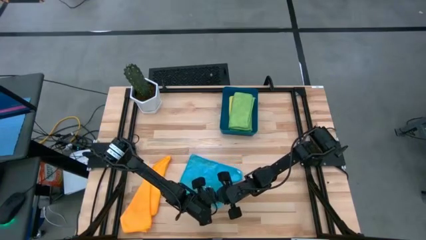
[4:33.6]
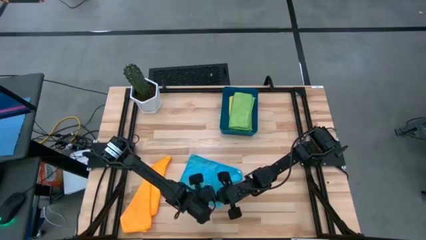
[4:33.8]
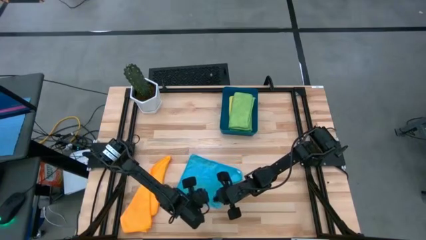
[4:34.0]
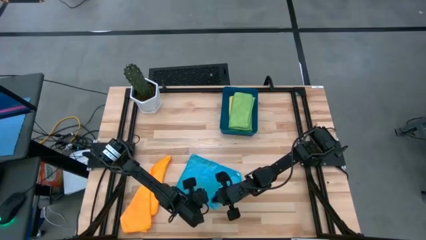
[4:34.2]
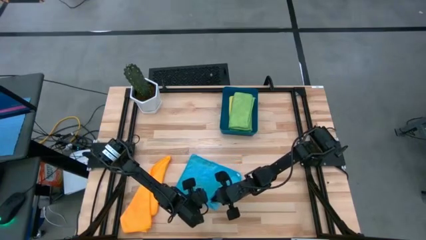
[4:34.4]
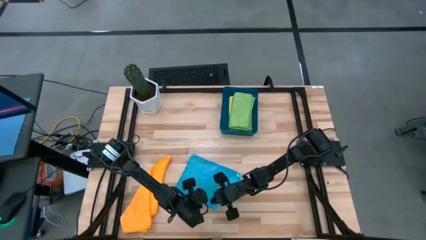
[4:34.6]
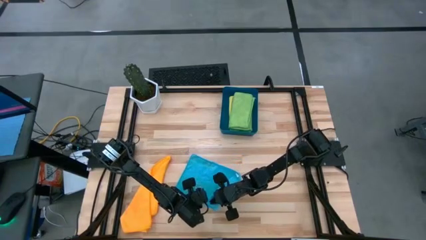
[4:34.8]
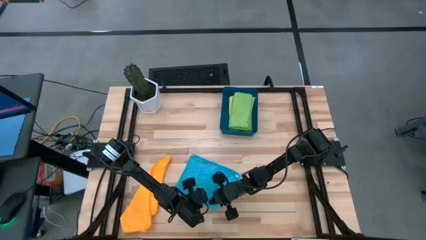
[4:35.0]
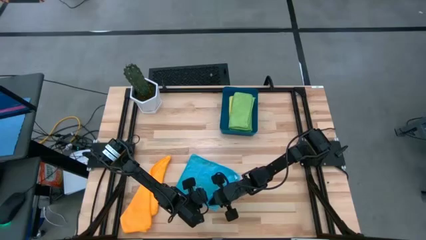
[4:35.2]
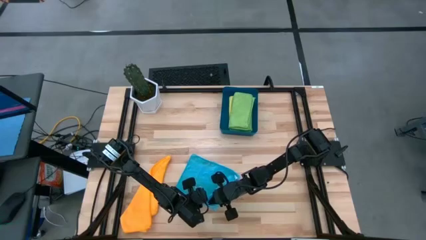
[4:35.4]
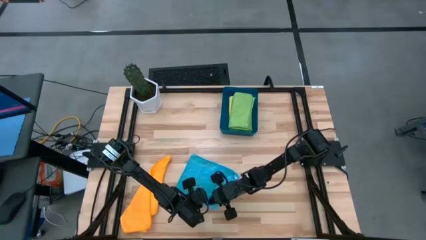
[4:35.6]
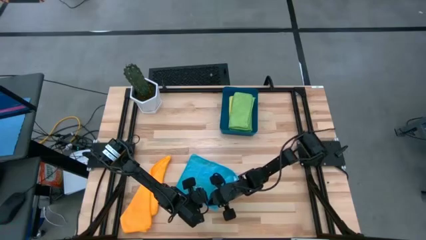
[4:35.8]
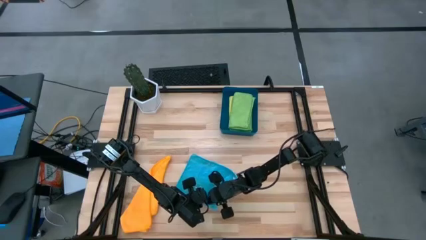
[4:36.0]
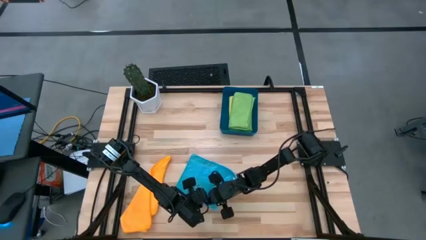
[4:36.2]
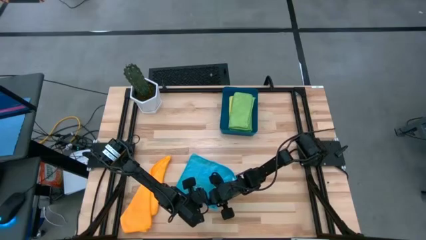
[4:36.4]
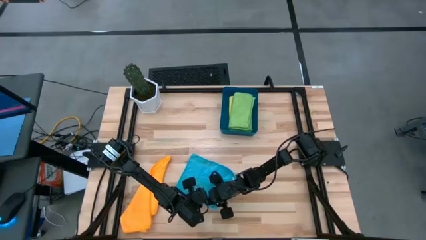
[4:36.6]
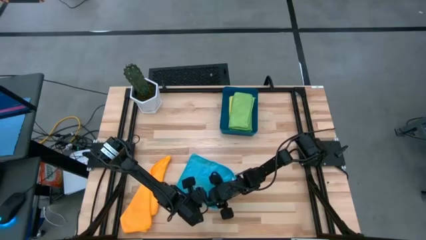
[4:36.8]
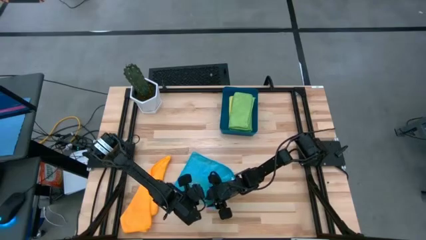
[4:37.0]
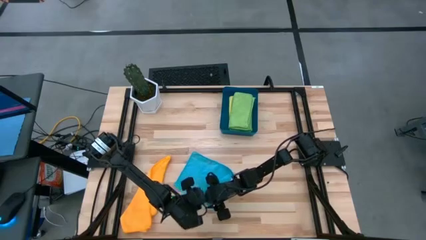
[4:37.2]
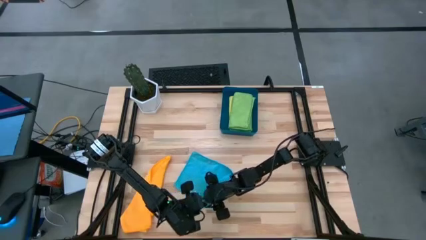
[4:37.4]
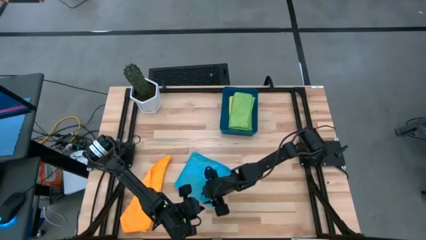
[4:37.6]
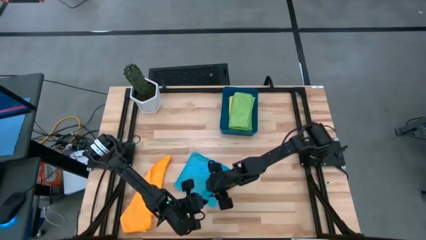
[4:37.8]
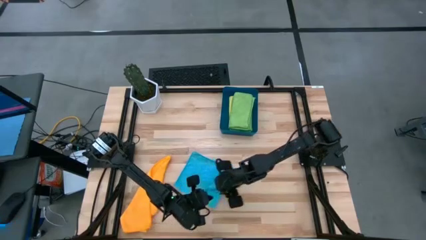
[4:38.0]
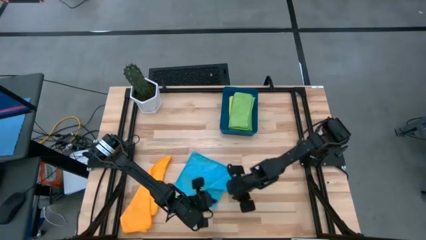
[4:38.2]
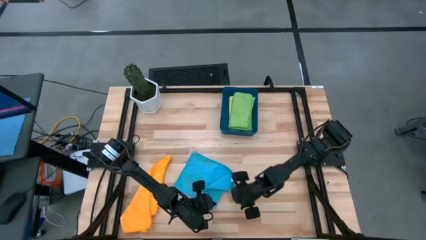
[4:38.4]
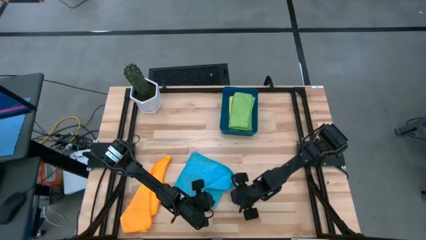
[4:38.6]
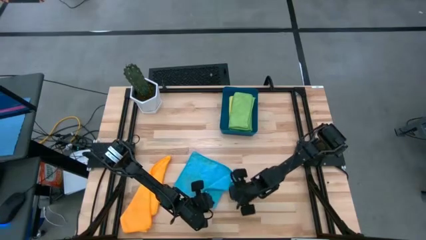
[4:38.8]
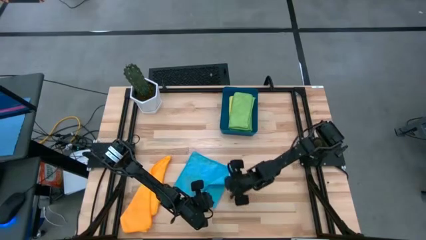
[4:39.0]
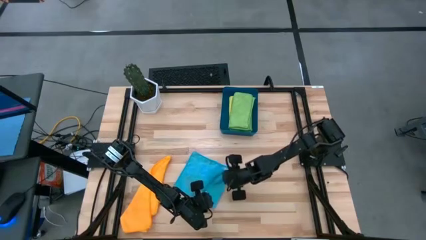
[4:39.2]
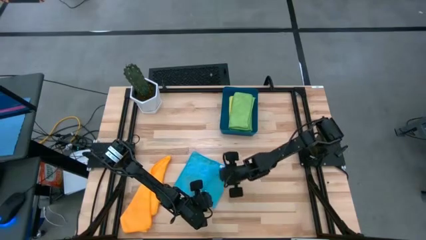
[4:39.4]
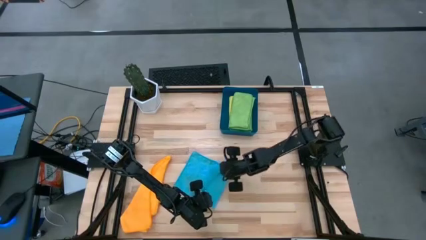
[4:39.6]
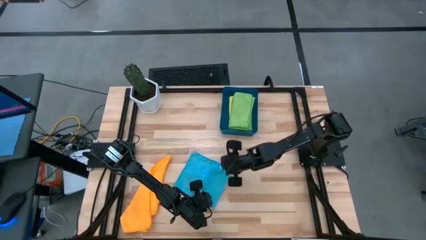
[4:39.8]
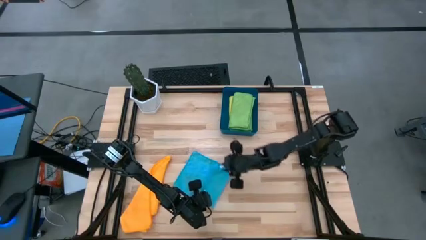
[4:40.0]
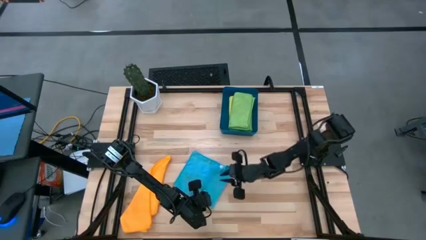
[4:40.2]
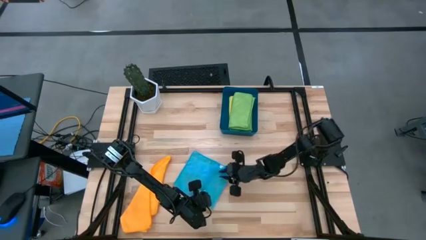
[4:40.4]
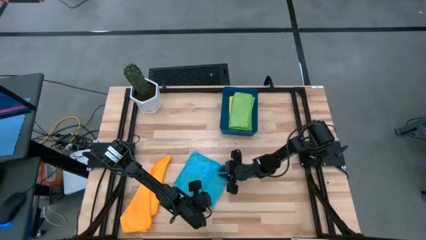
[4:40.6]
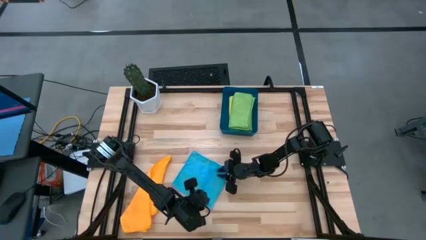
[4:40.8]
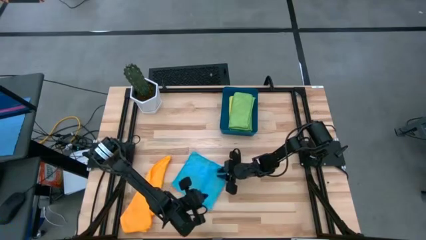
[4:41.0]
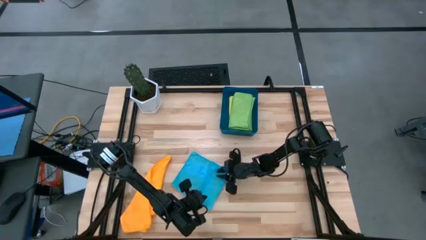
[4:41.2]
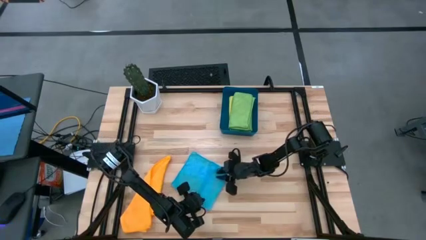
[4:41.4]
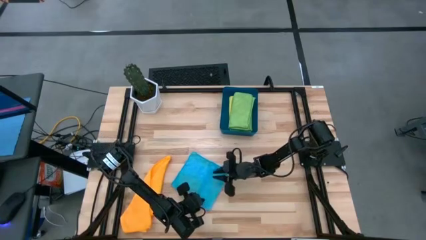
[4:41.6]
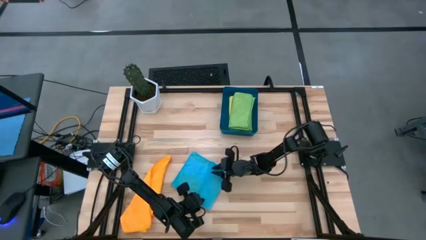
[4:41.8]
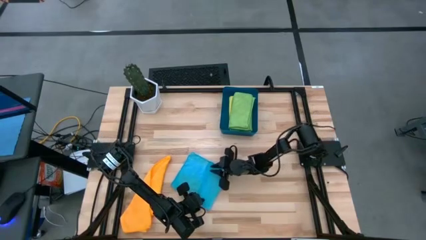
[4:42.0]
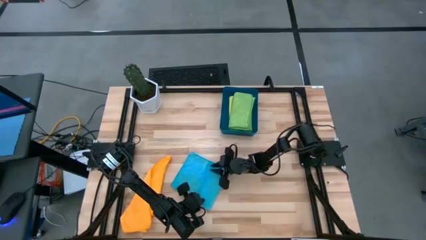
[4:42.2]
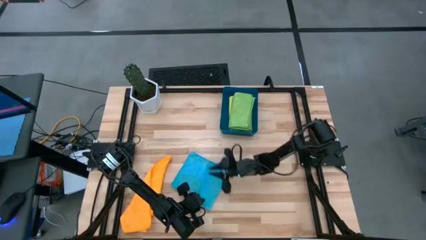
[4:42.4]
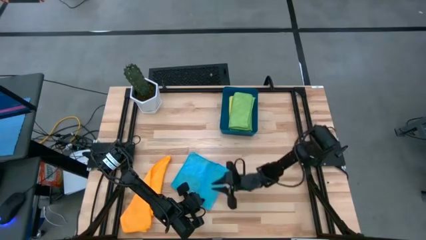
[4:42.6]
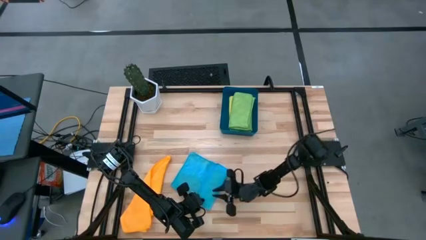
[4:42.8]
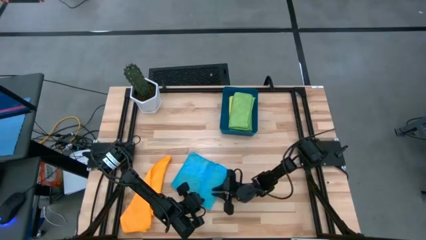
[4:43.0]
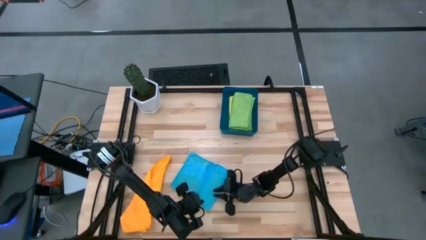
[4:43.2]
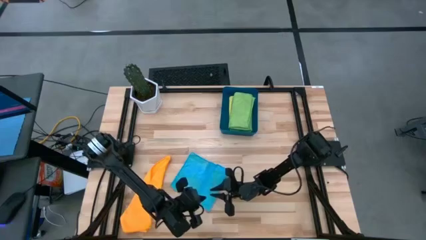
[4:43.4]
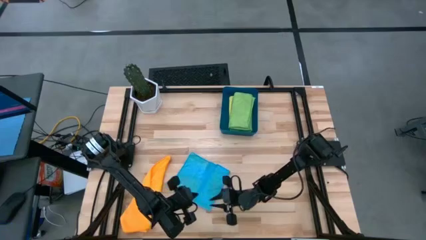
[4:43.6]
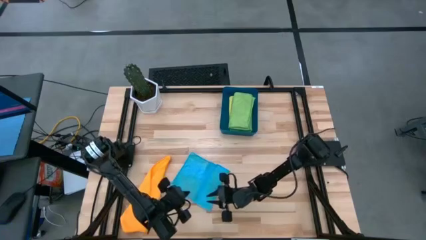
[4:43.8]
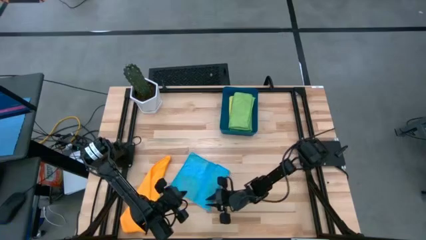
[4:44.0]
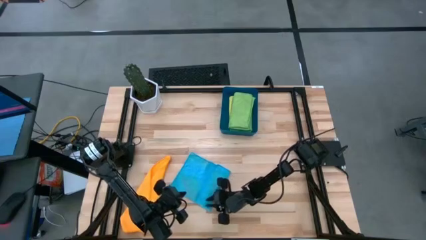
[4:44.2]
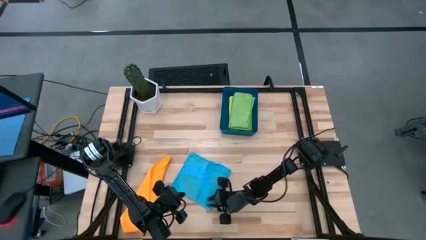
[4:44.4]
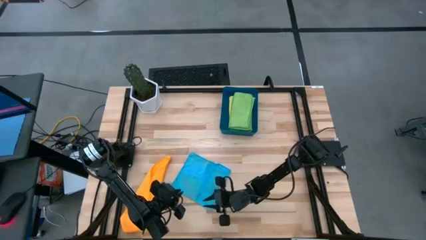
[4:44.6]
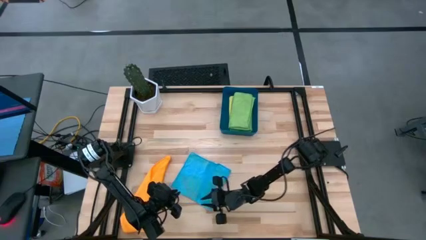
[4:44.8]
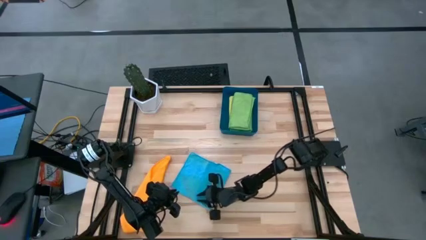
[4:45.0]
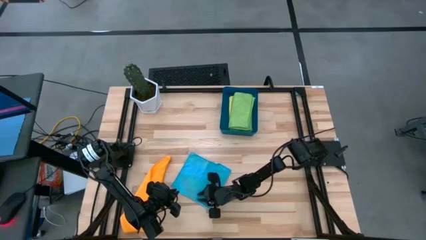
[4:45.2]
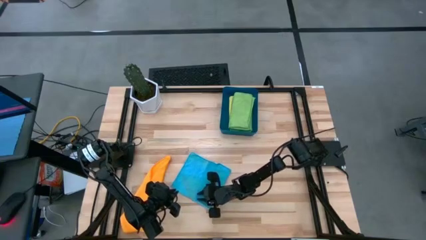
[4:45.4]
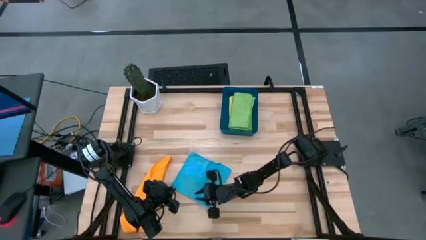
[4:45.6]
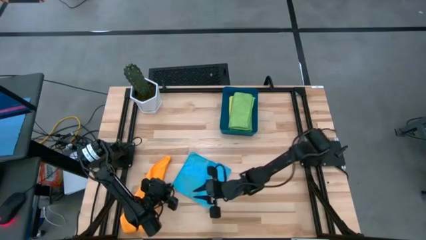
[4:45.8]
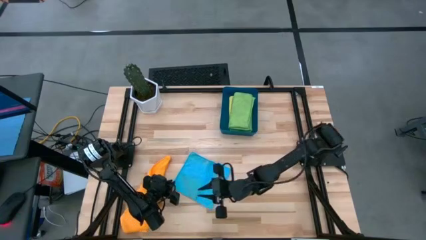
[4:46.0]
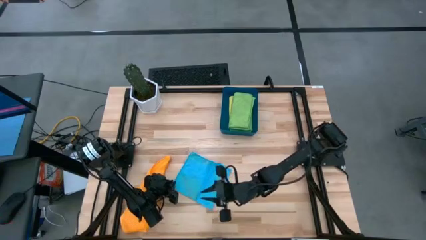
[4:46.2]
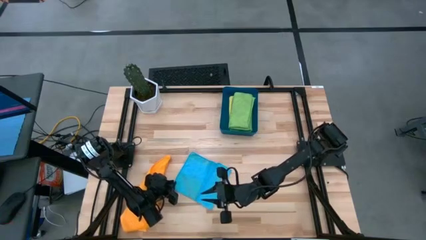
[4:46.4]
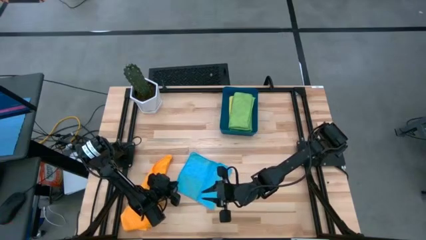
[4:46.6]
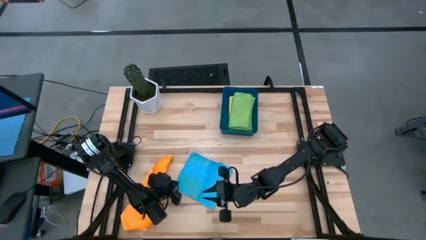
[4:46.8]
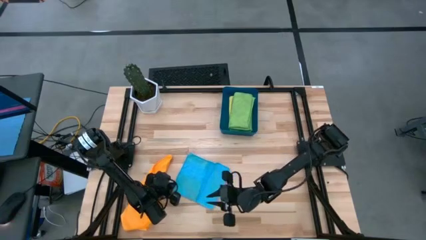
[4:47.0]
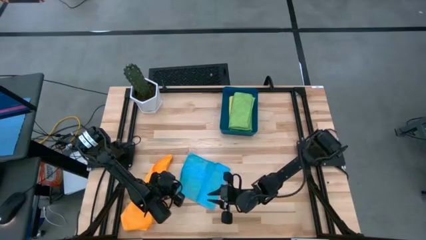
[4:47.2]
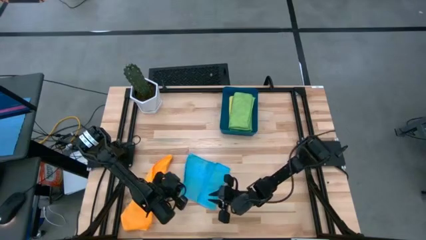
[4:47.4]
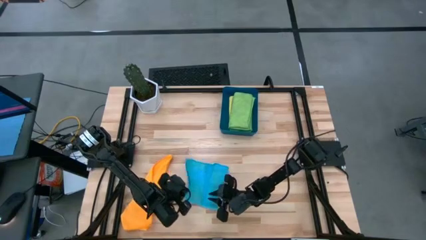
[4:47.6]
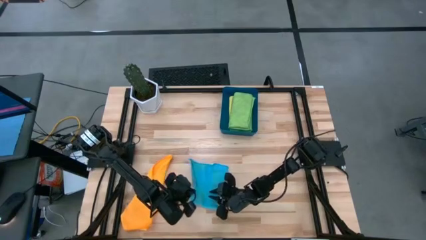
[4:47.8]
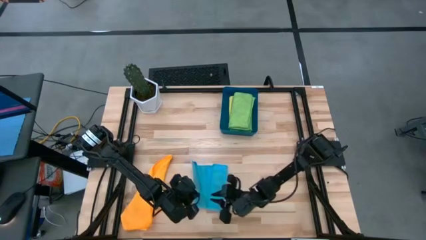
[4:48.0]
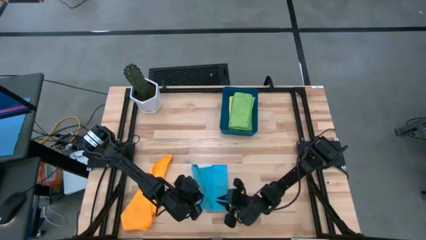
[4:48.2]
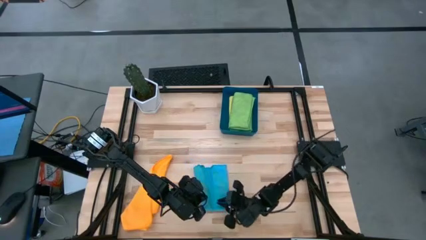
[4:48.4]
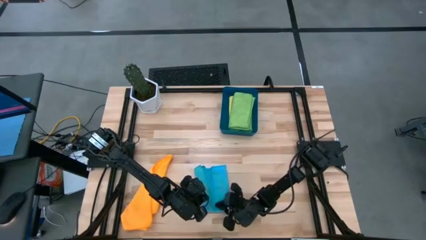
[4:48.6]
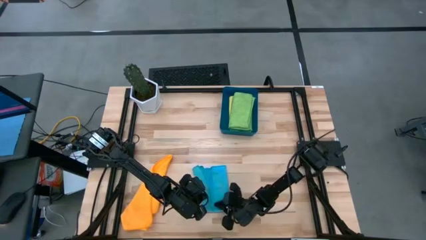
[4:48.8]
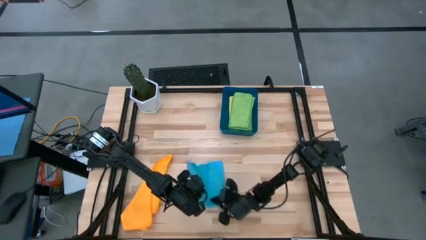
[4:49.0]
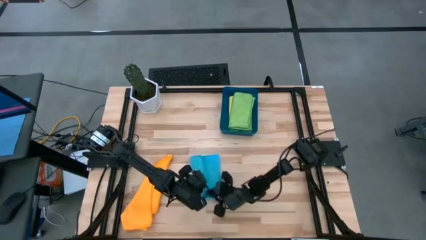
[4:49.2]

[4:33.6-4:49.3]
Task: Fold microfiber towels
Fold the blue towel
